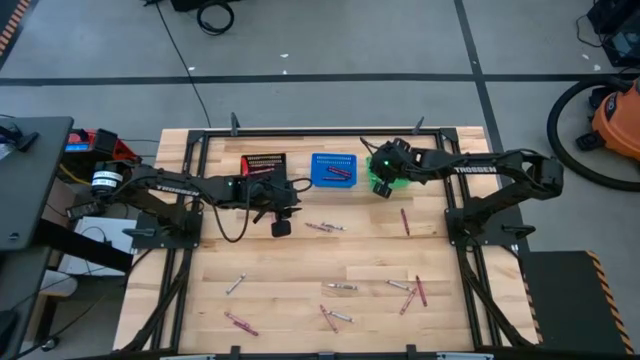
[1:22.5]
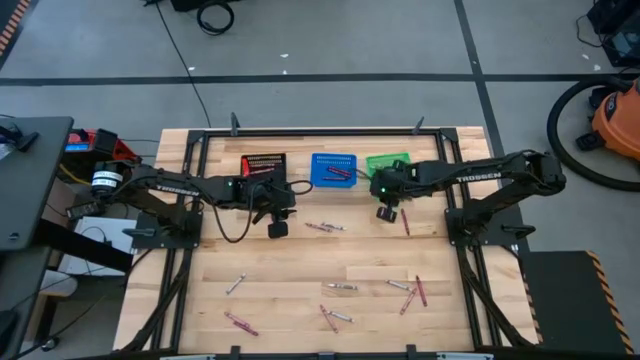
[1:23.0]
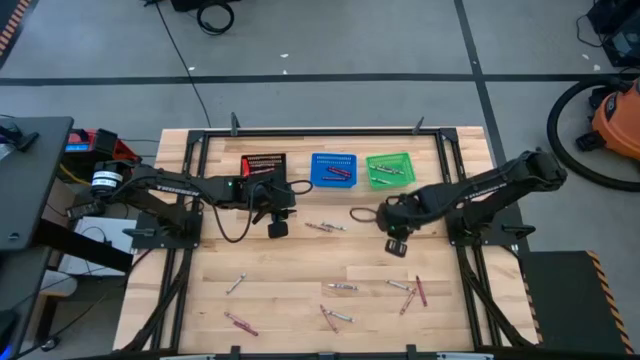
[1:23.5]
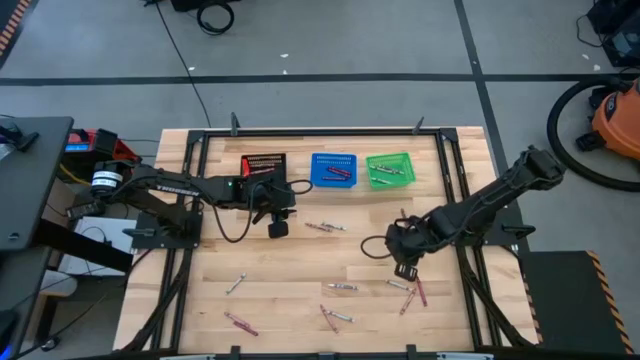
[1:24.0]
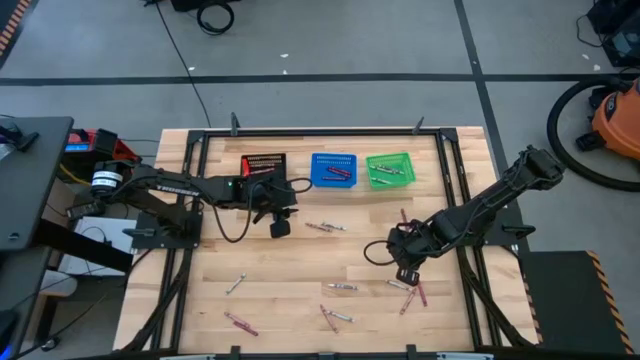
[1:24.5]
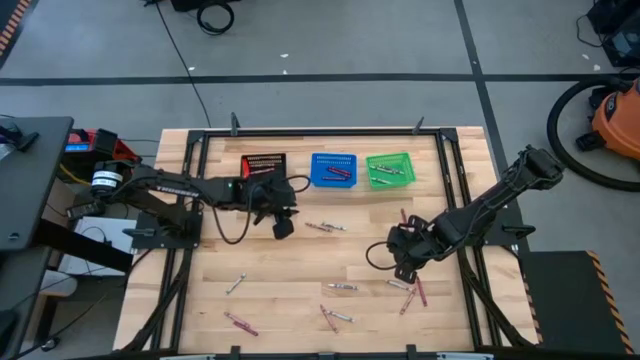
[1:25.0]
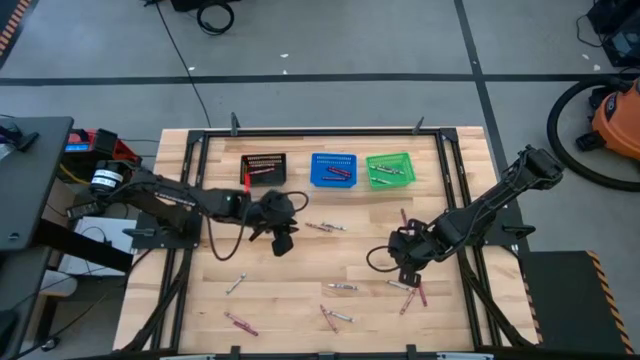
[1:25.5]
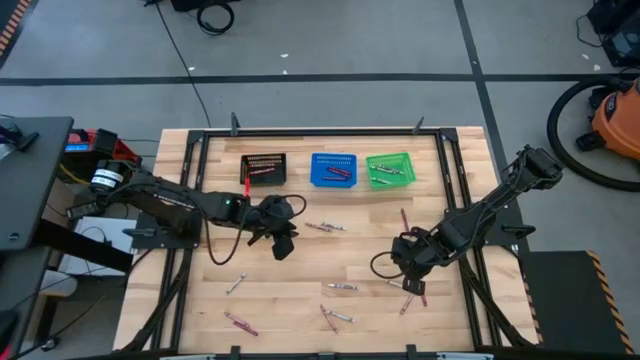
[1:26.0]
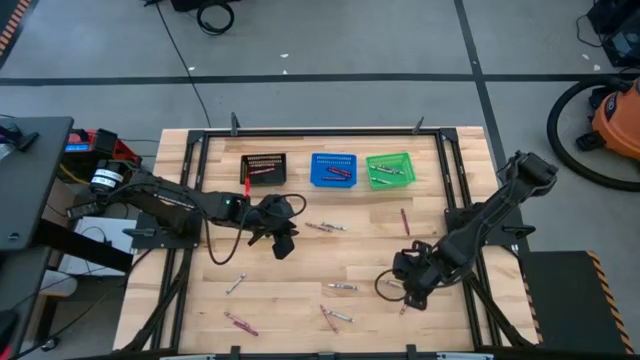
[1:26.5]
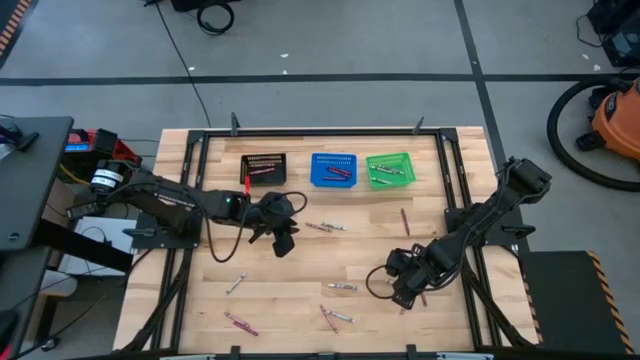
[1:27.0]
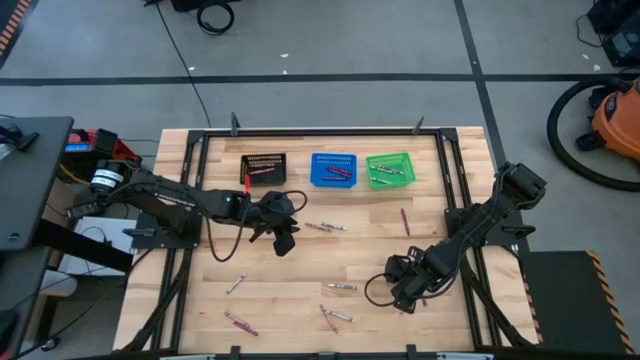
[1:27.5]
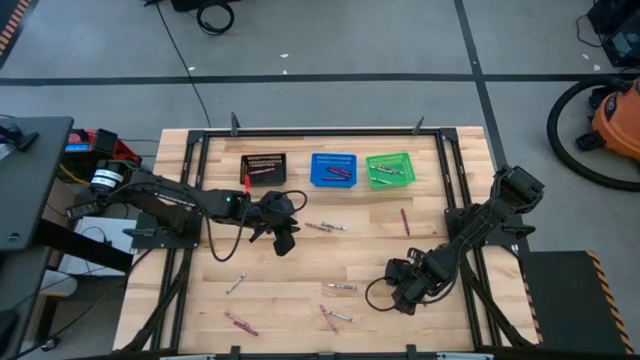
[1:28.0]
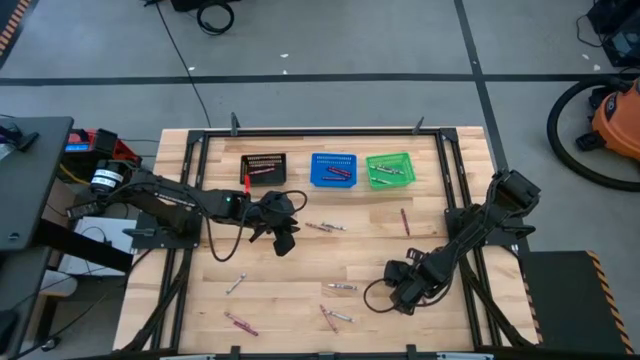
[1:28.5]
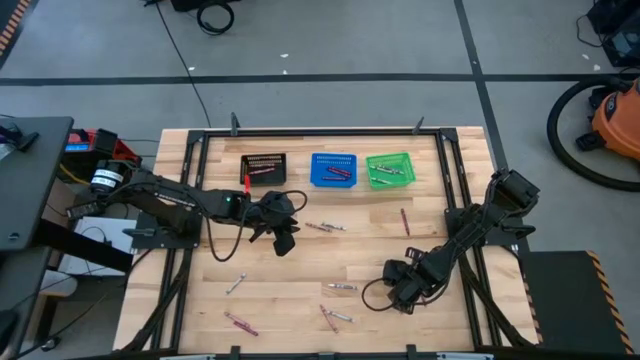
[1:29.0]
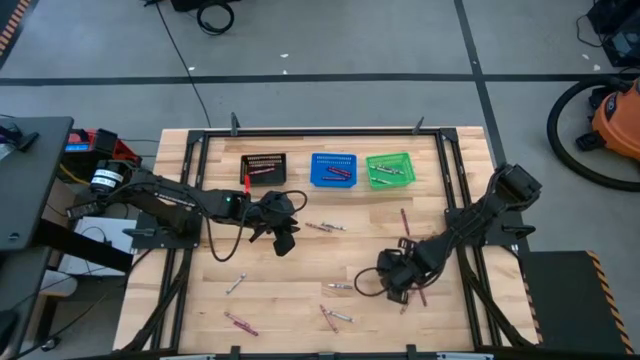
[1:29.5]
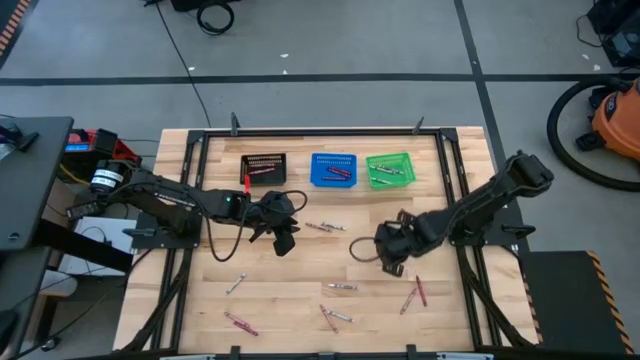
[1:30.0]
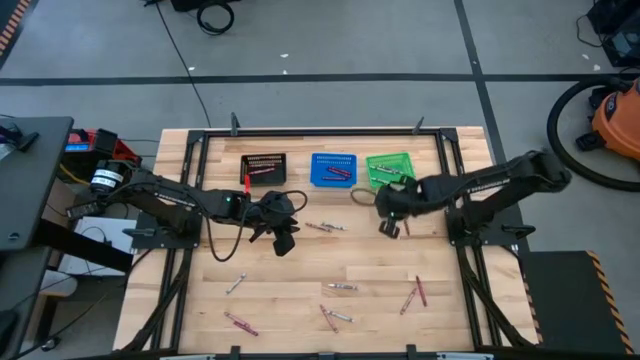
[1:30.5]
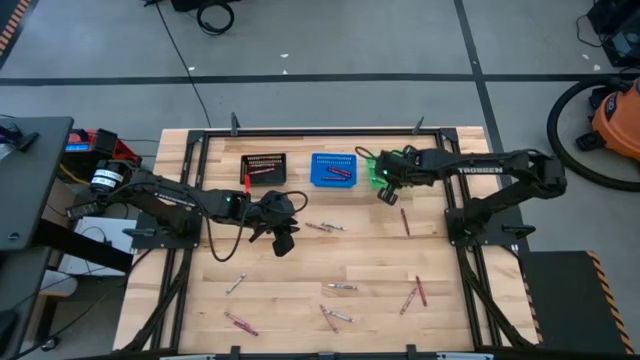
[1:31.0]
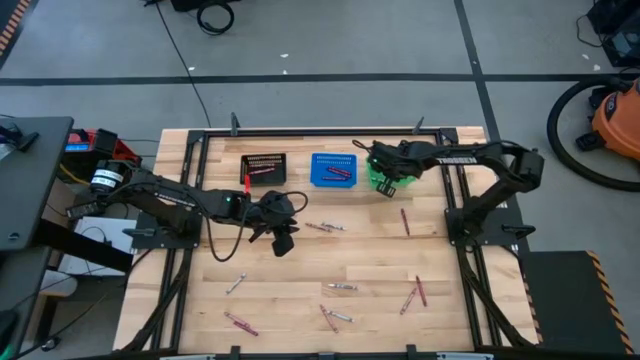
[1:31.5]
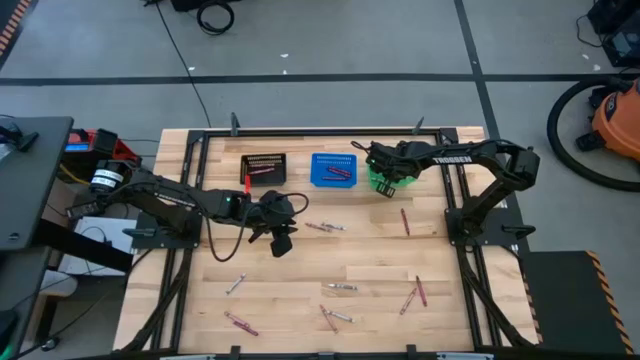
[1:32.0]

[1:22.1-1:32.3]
Task: Sort crayons
Put the white crayon into the green bin

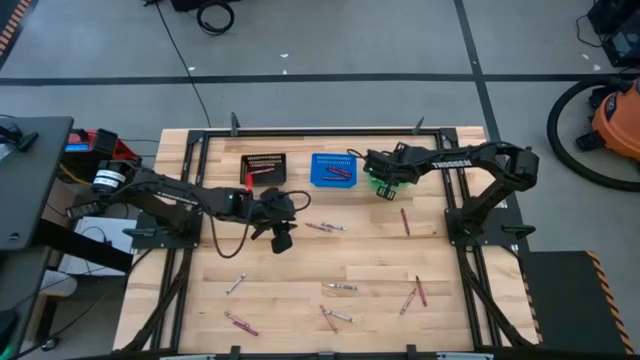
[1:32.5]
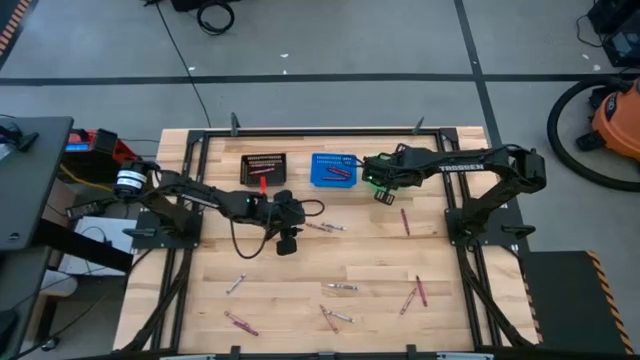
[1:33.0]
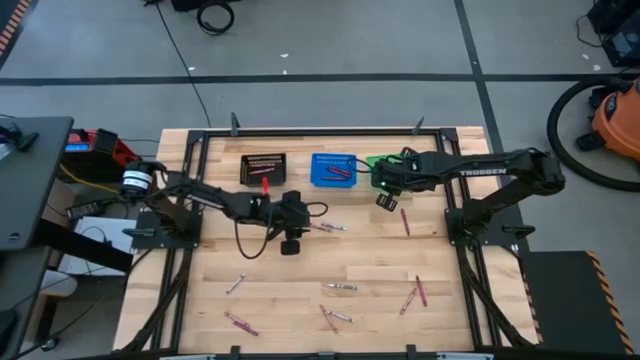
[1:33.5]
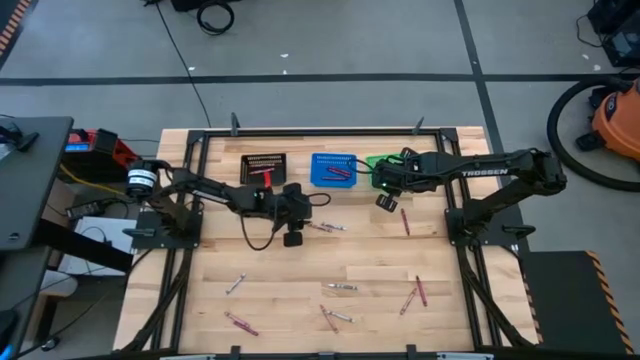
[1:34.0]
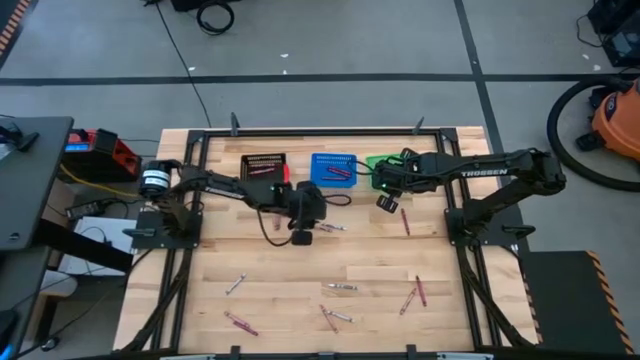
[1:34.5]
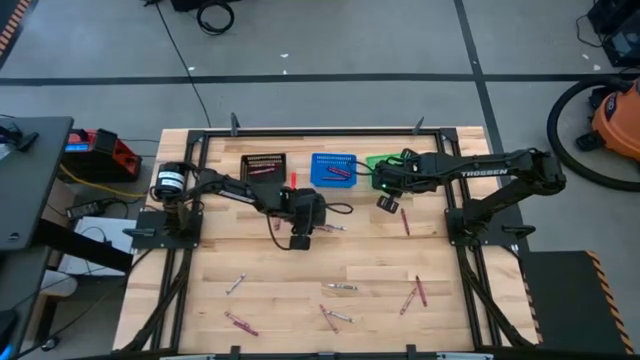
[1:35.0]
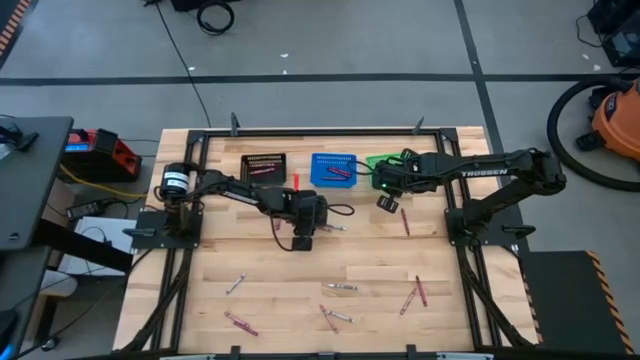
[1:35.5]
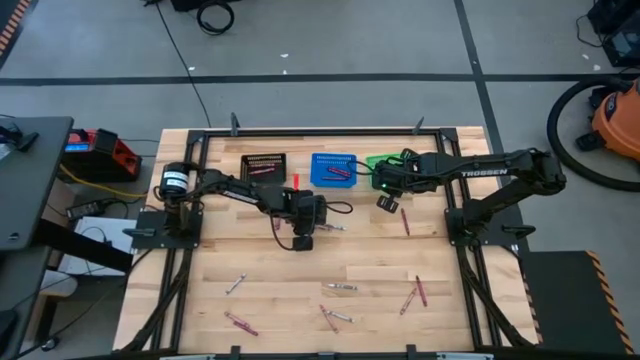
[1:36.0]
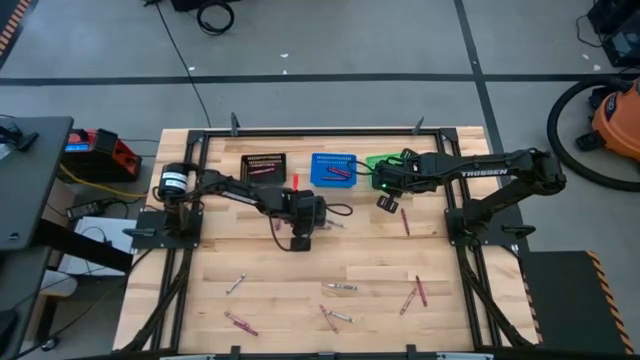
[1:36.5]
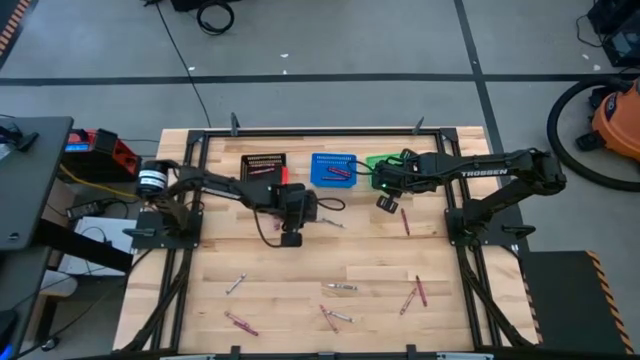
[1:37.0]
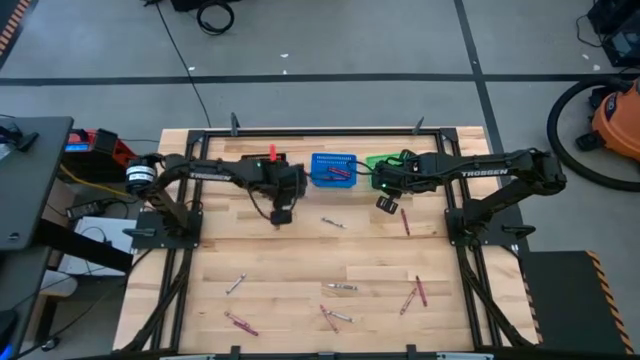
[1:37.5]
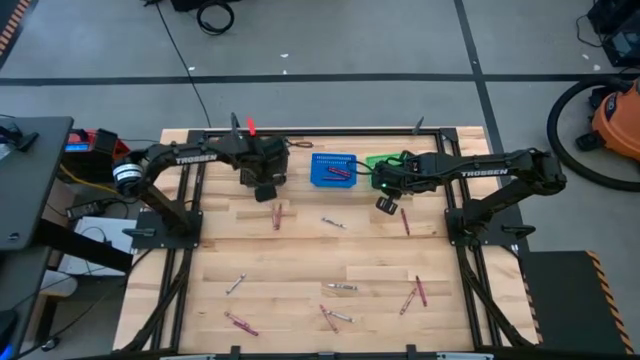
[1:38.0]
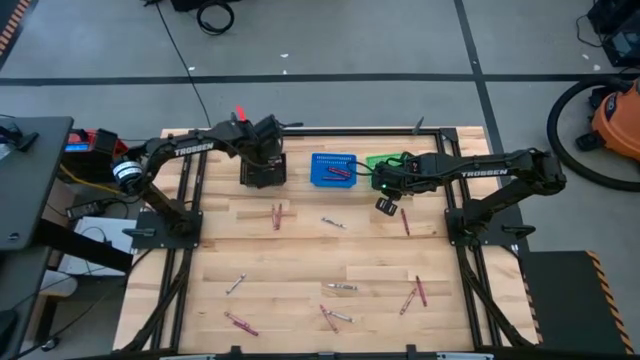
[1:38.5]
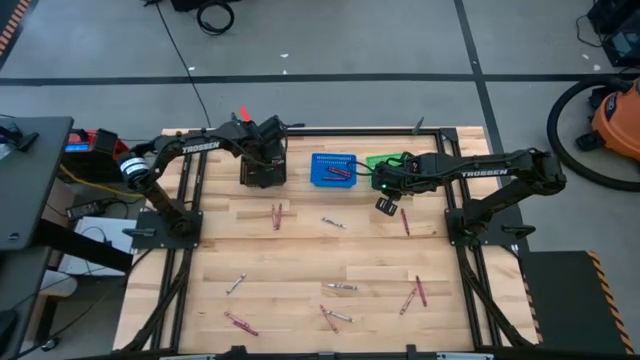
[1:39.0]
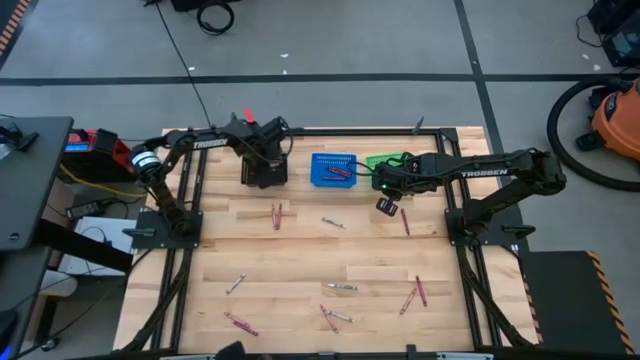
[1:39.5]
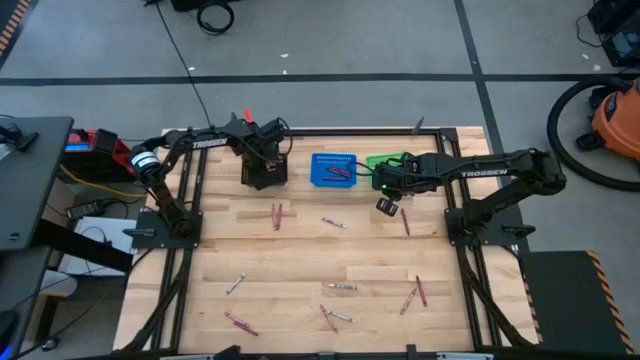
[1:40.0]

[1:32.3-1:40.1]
Put the pink crayon into the black bin

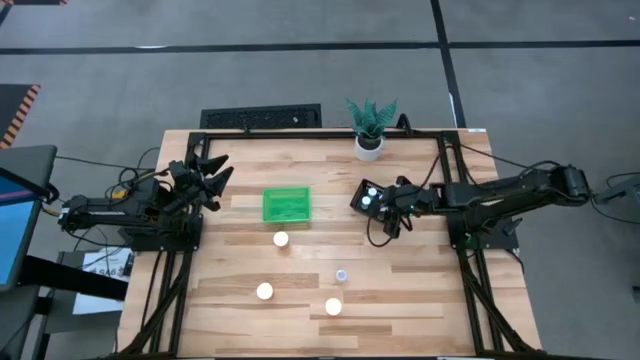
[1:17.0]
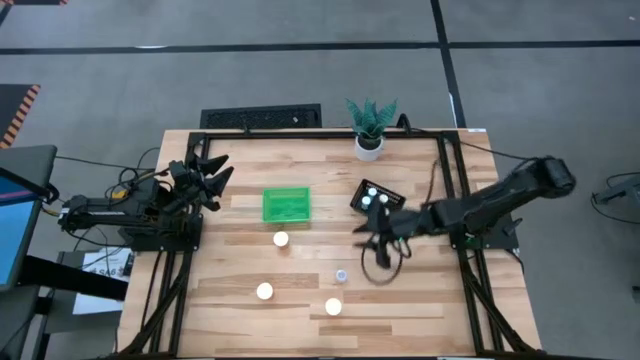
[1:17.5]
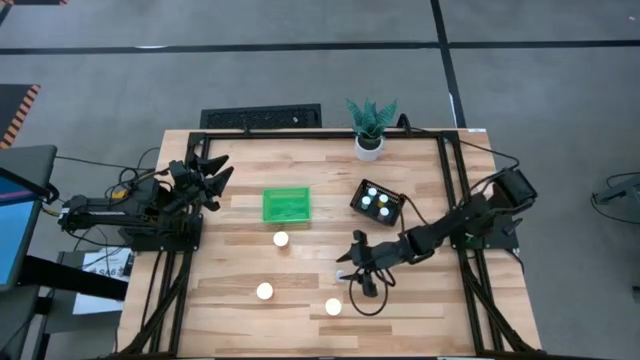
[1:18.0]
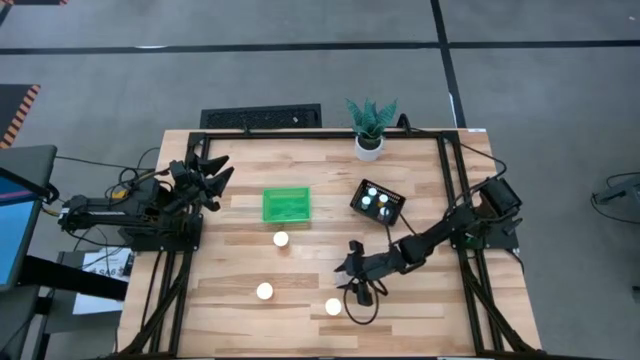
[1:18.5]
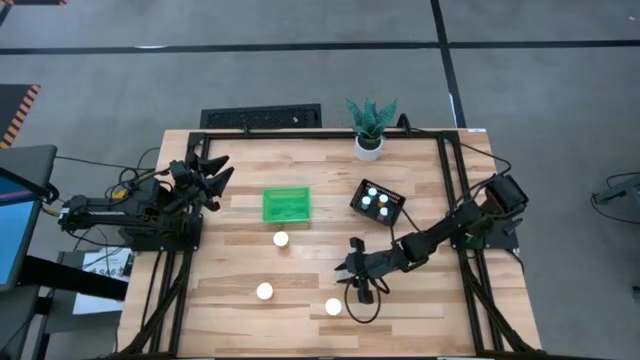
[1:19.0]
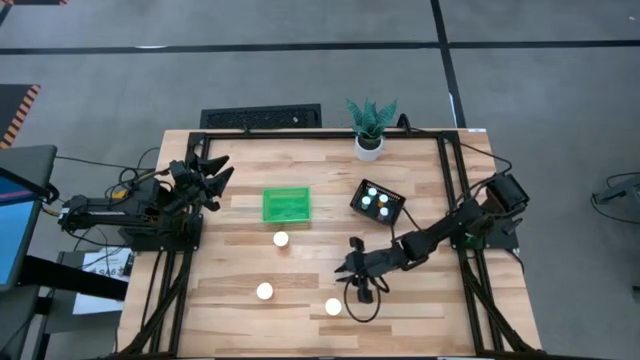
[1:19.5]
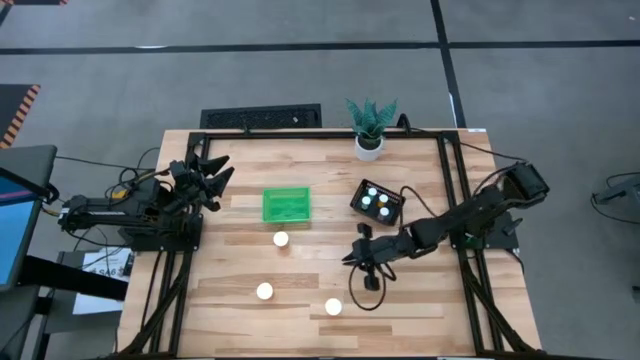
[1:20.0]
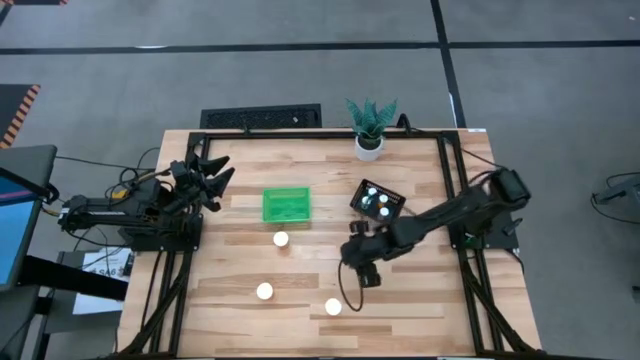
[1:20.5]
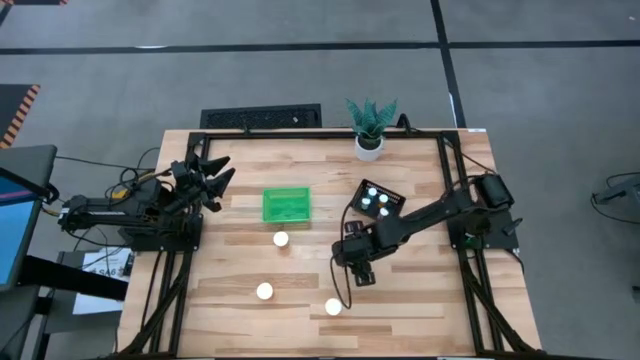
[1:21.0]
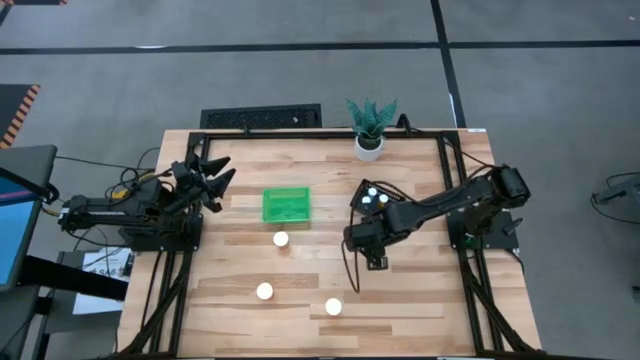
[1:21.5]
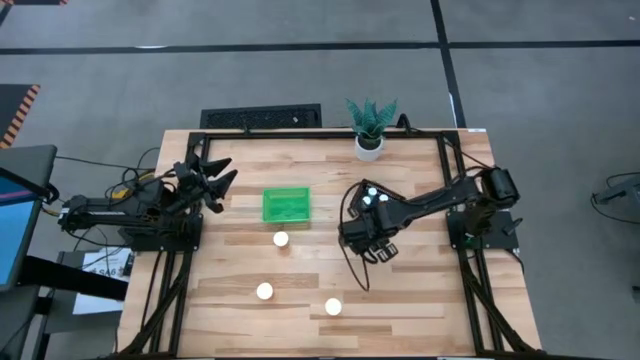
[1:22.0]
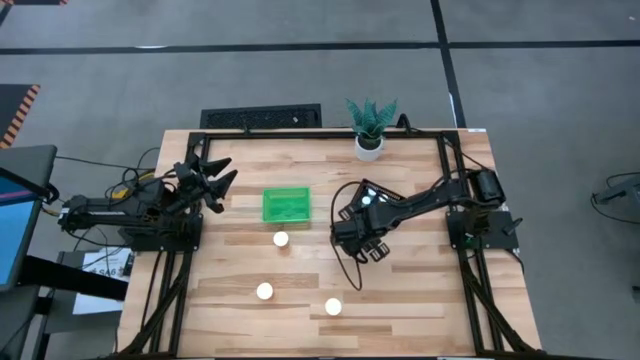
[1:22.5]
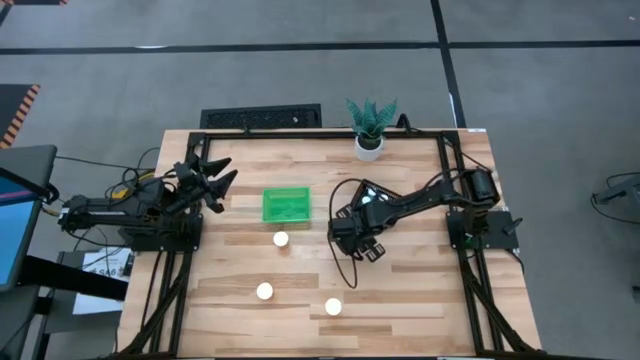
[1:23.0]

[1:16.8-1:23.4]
Task: Pick and place medicine bottles into bin by pill shape (circle, oval)
Put the transparent capsule bottle into the green basket
